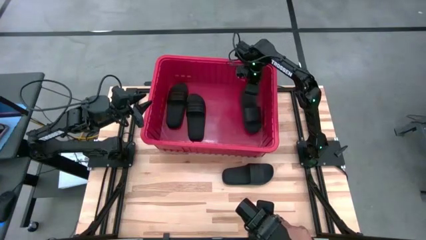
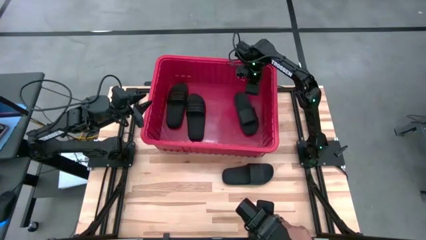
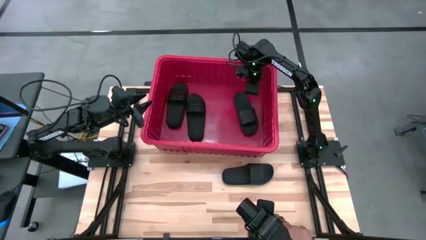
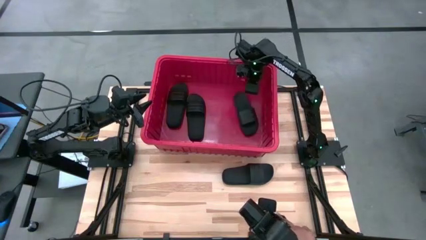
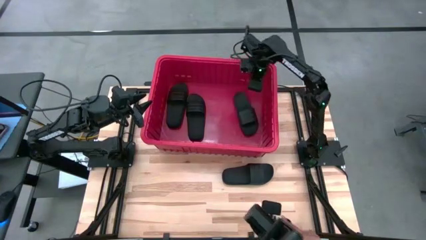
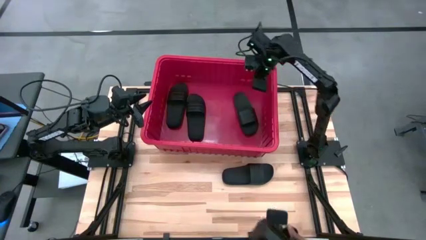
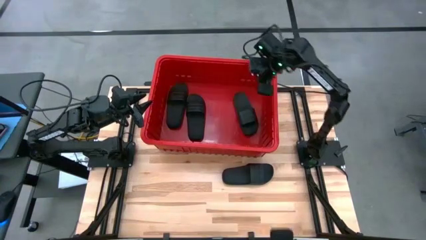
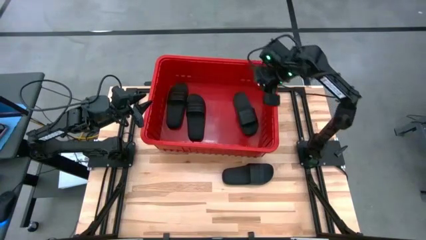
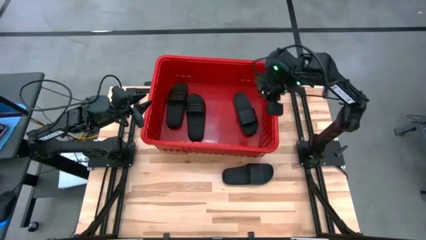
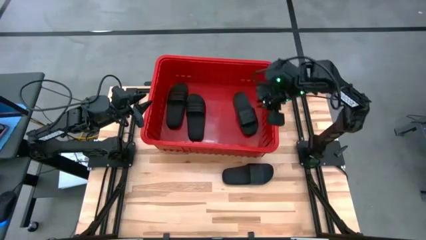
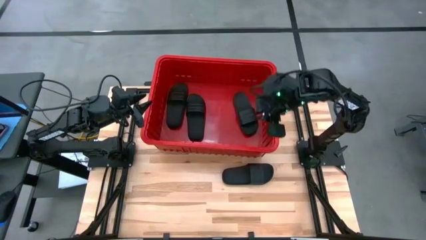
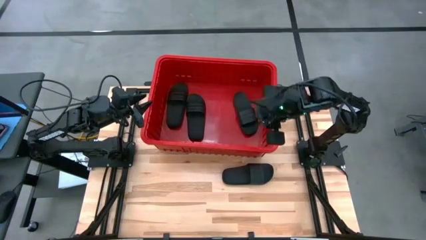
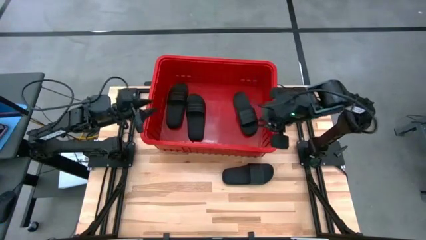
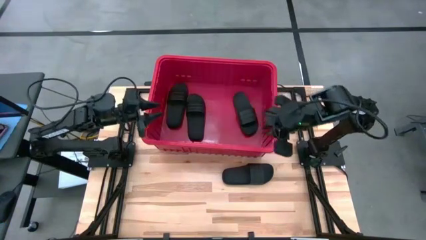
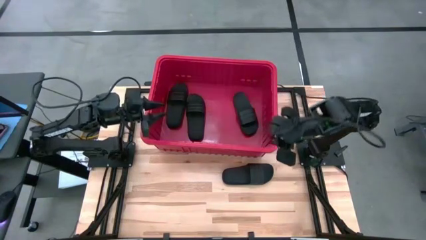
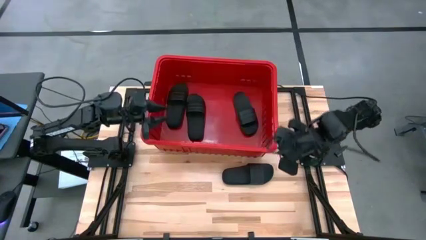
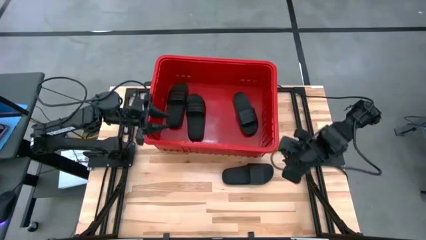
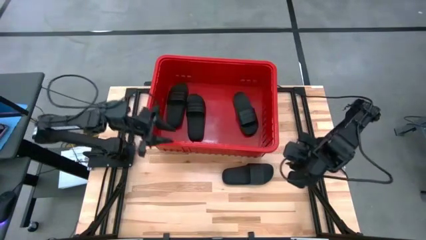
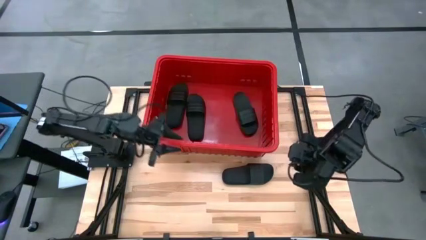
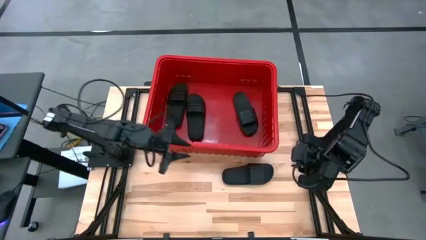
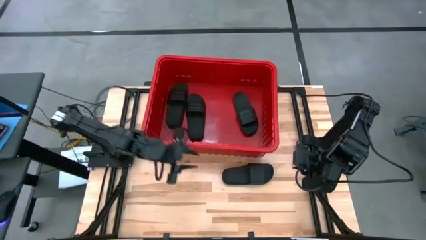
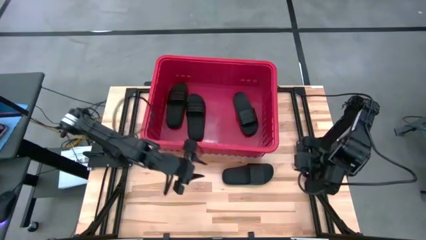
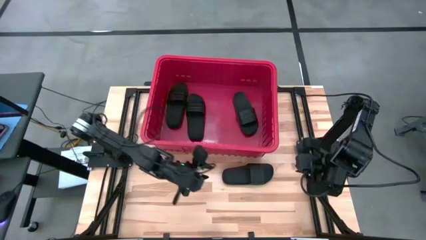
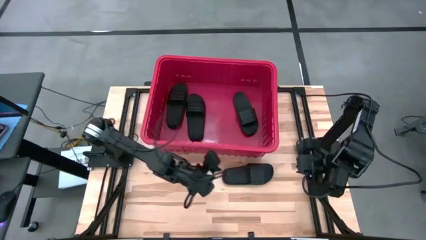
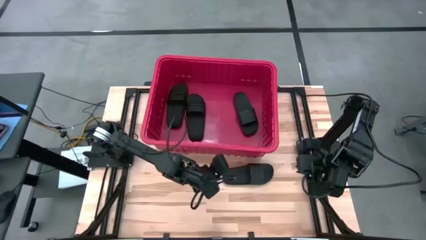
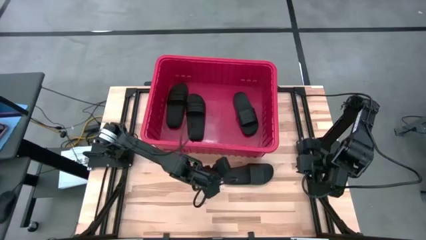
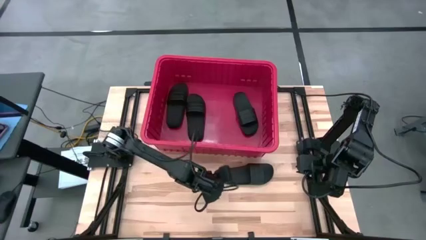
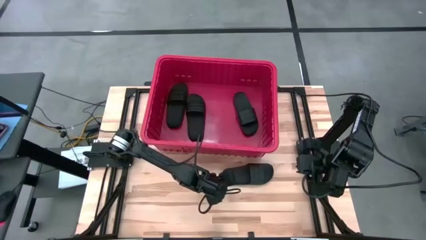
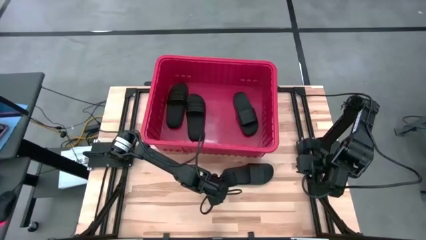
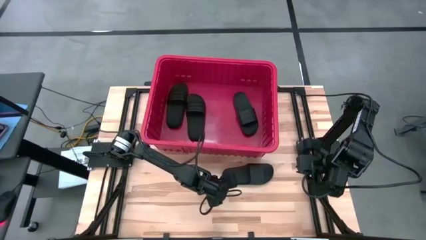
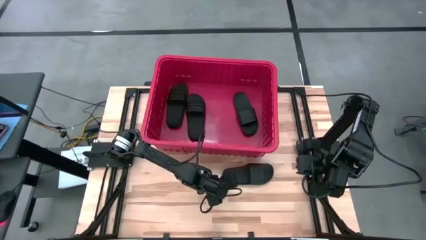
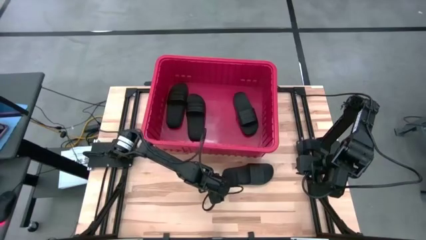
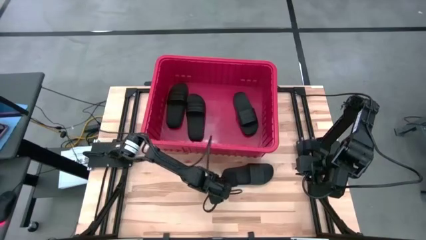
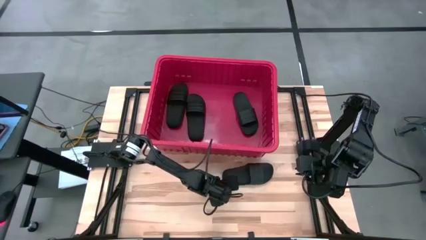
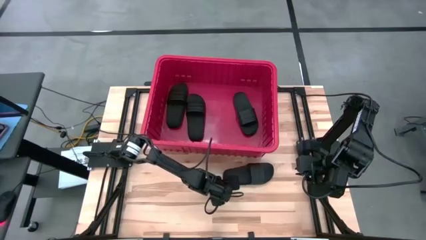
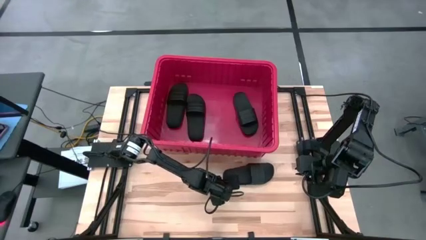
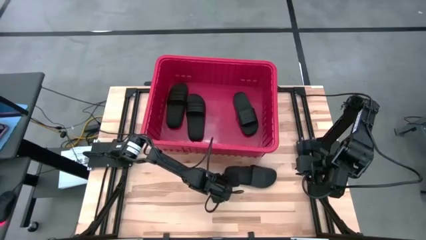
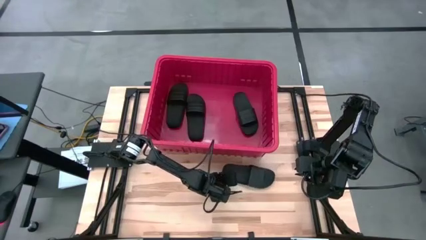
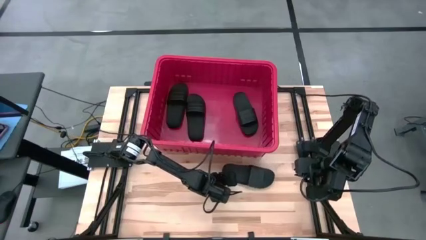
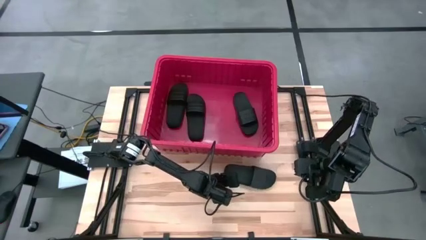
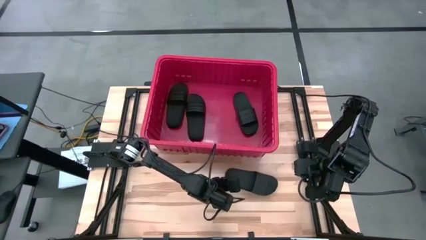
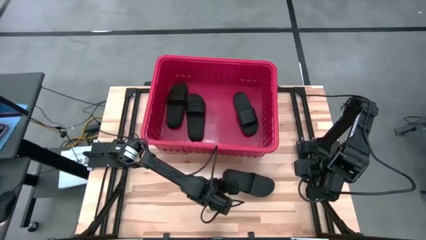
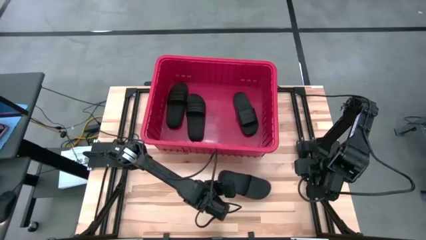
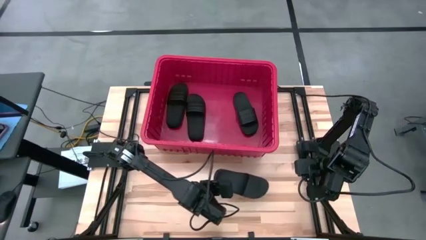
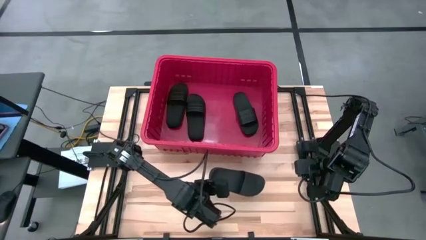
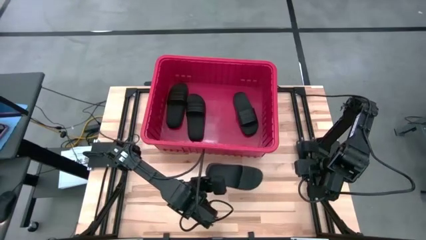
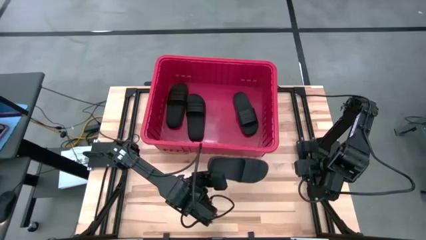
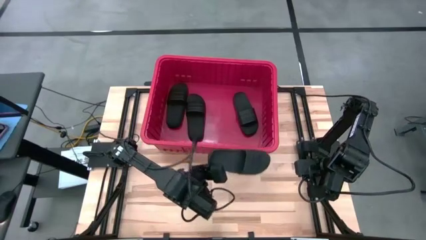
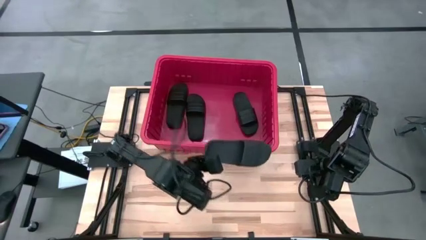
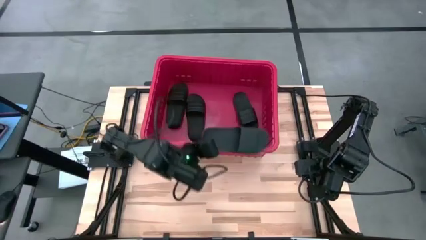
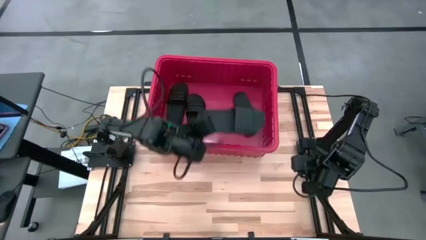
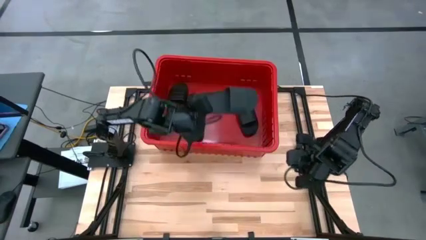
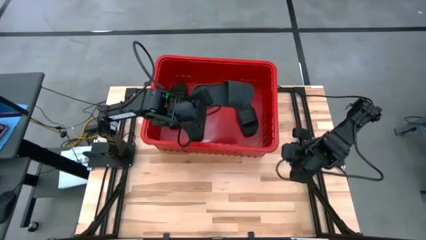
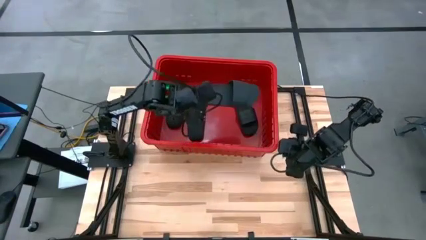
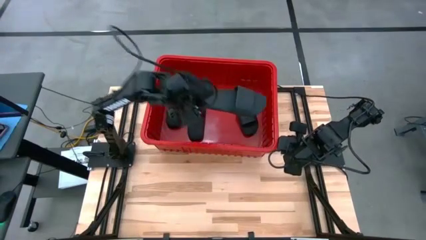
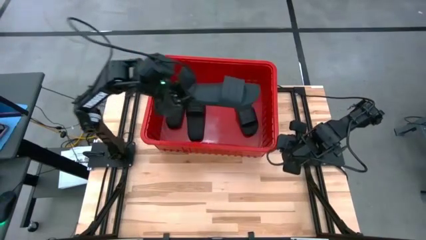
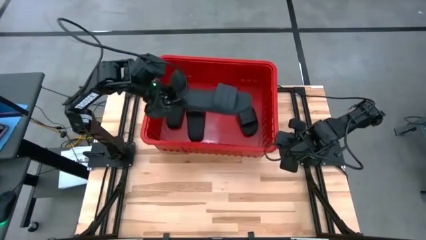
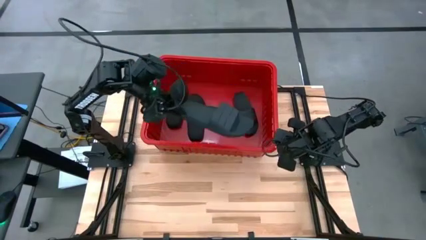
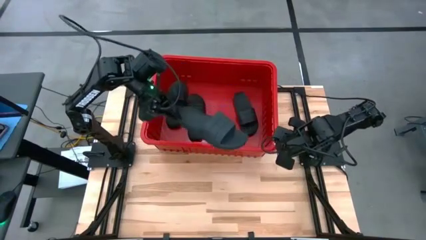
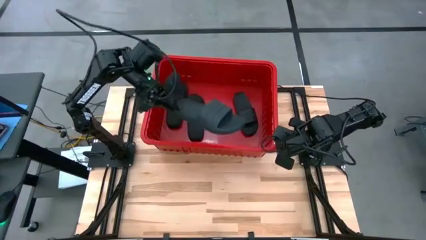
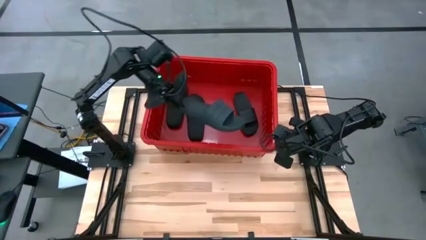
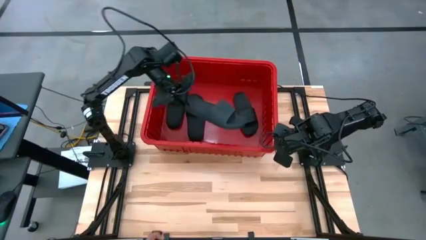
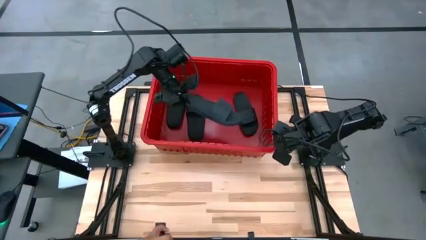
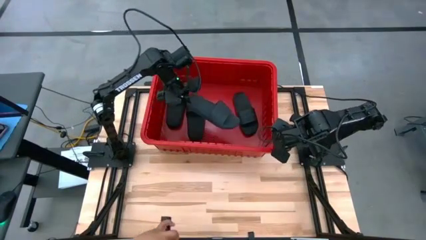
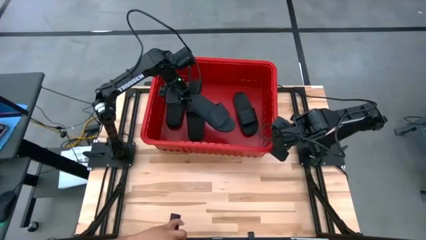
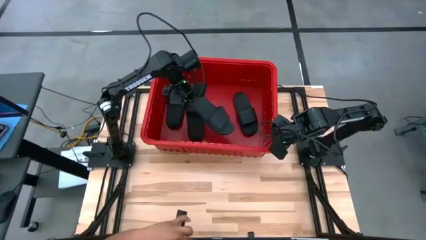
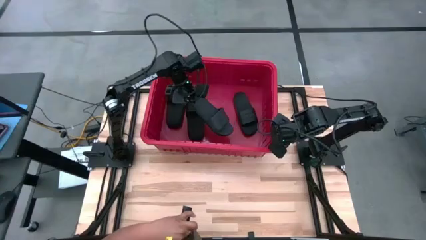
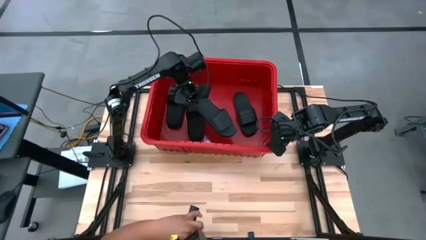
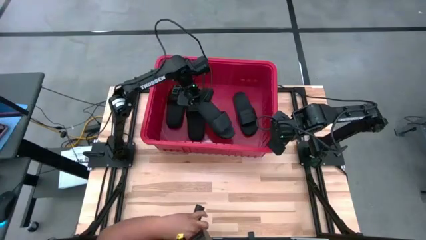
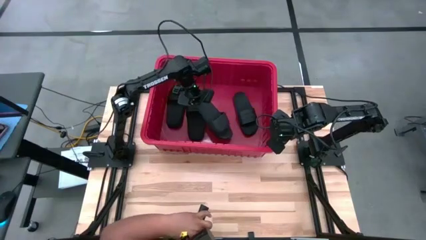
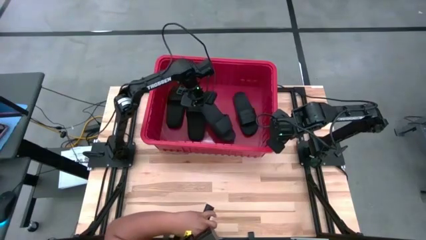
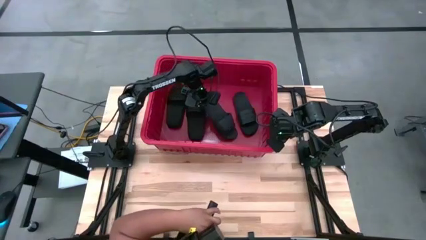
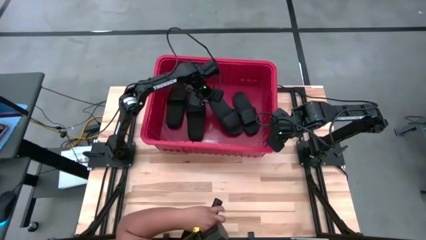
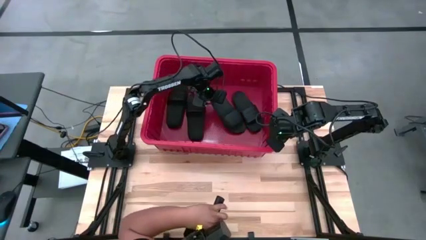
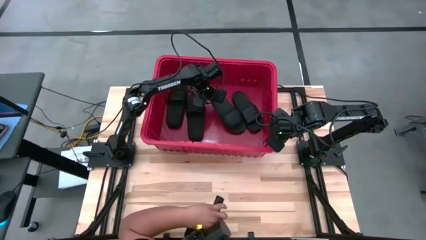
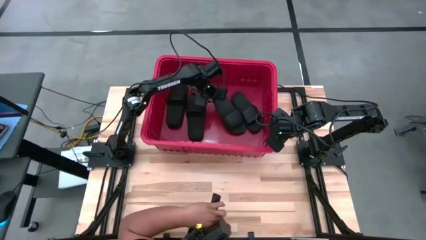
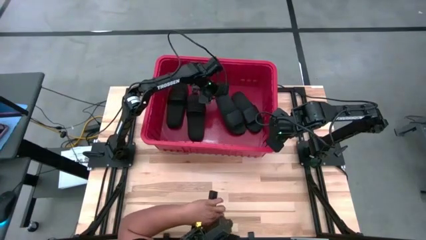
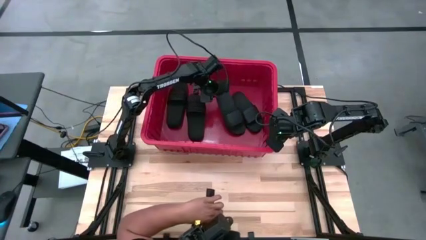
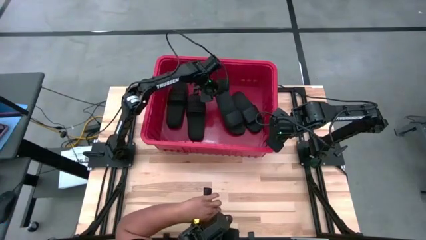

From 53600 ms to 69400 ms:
Task: Pick and place slides into bin
Put the black slide into the red organizer bin
